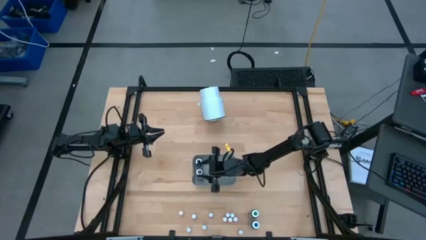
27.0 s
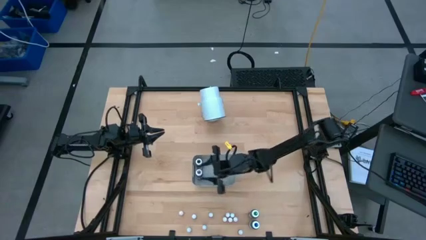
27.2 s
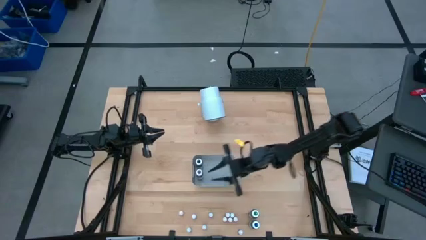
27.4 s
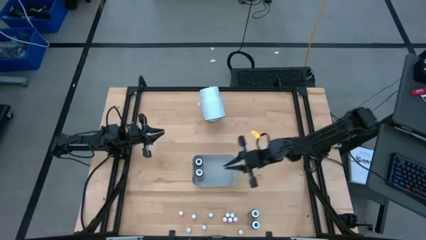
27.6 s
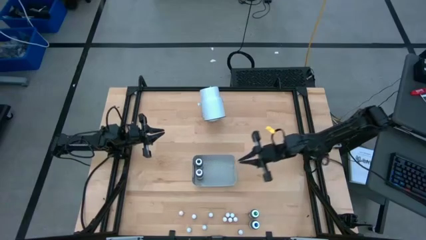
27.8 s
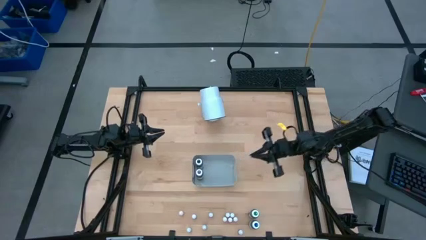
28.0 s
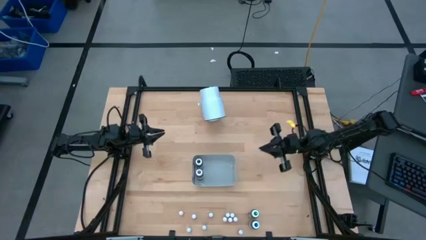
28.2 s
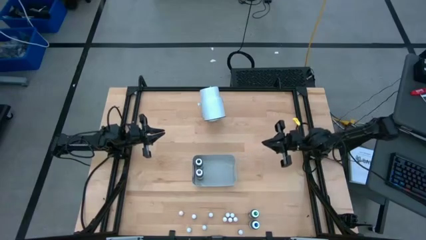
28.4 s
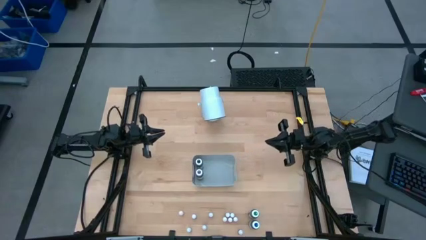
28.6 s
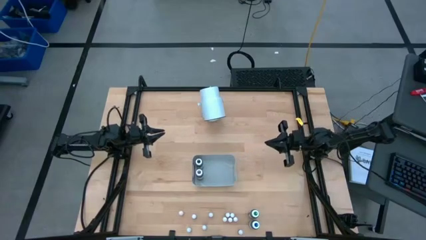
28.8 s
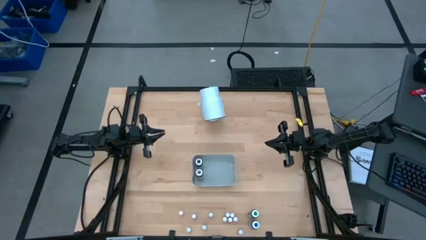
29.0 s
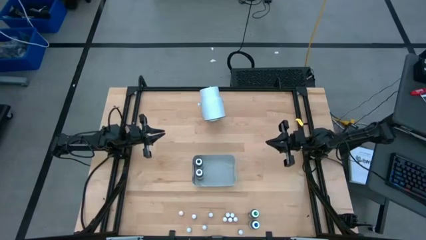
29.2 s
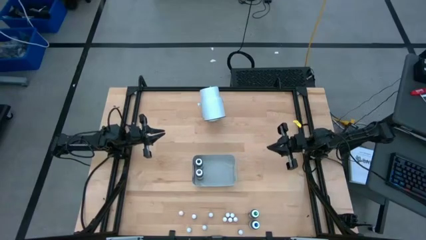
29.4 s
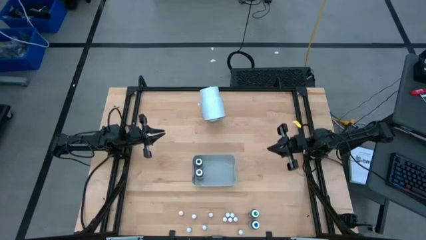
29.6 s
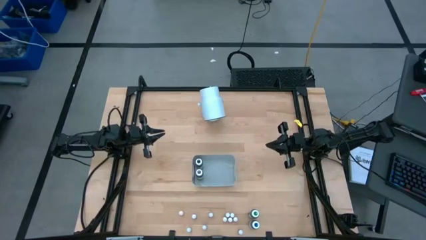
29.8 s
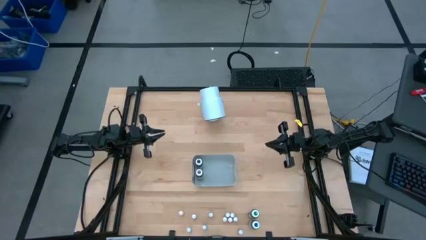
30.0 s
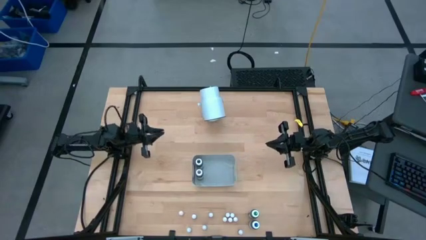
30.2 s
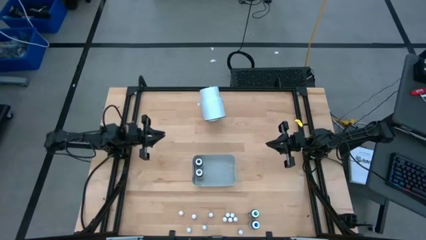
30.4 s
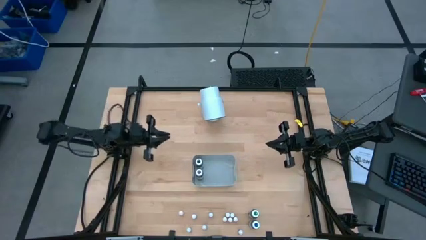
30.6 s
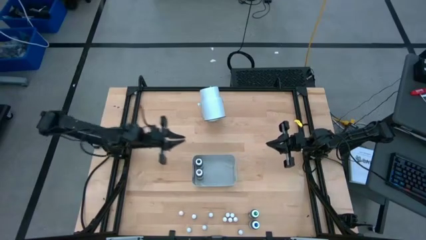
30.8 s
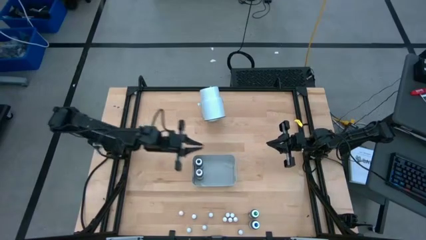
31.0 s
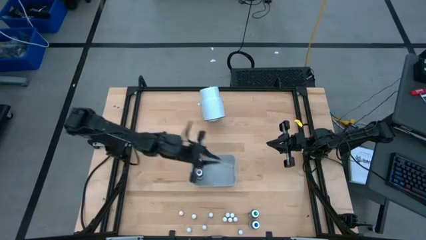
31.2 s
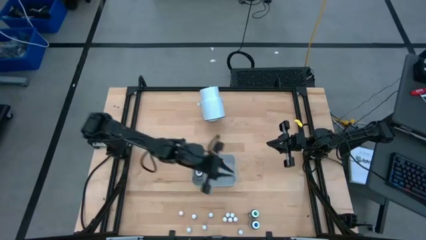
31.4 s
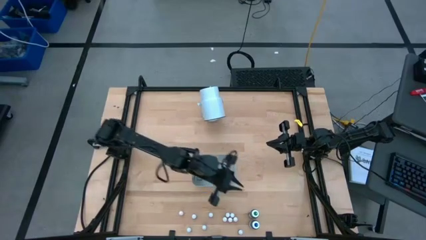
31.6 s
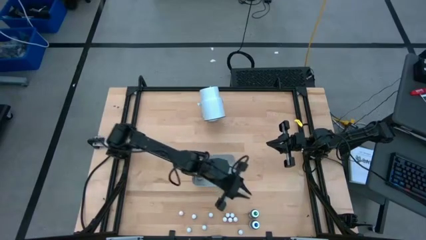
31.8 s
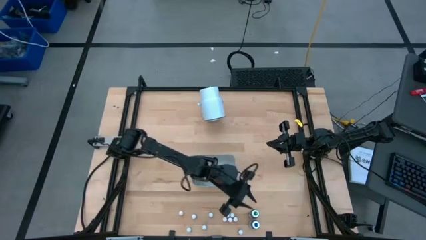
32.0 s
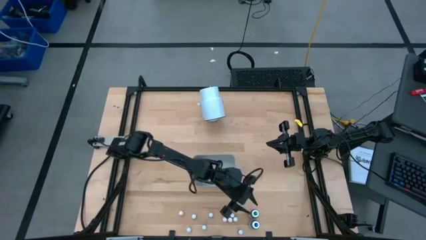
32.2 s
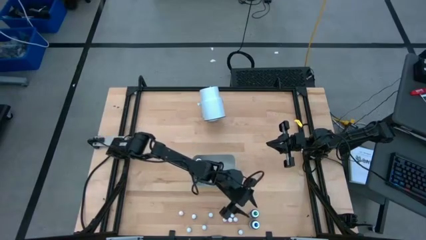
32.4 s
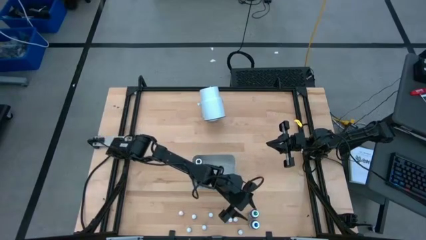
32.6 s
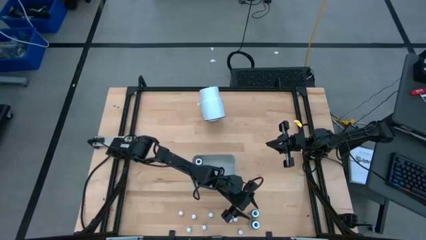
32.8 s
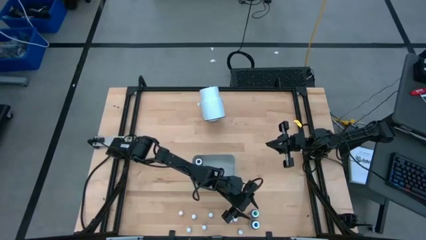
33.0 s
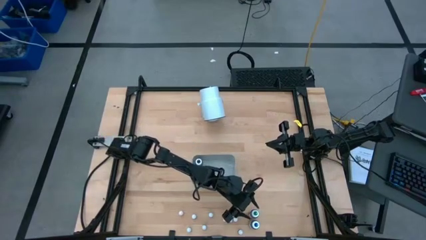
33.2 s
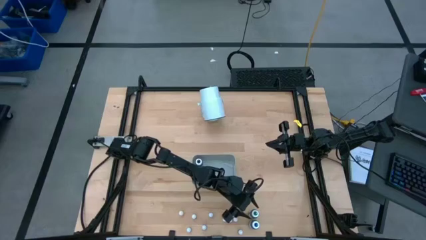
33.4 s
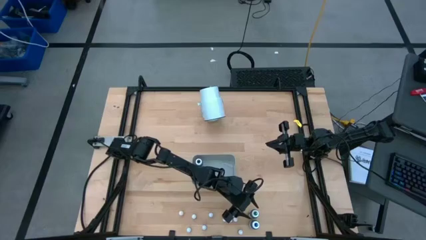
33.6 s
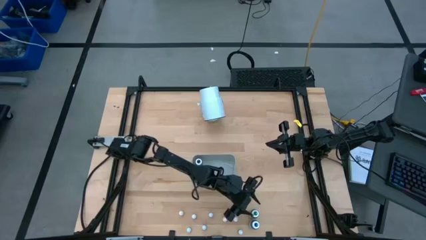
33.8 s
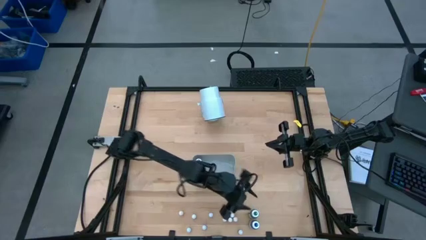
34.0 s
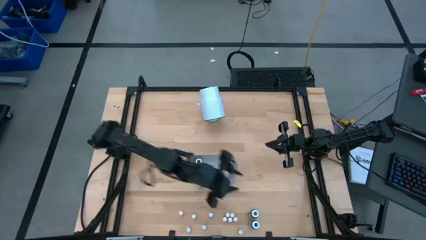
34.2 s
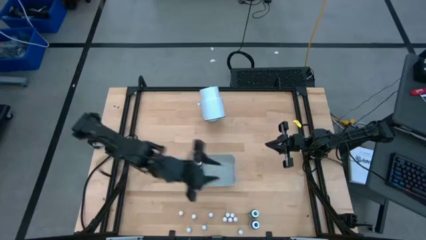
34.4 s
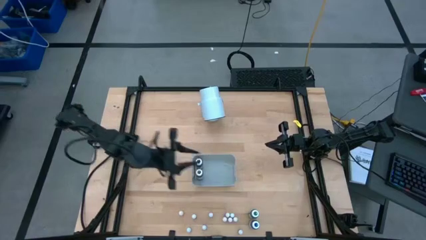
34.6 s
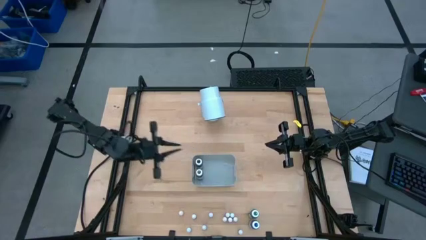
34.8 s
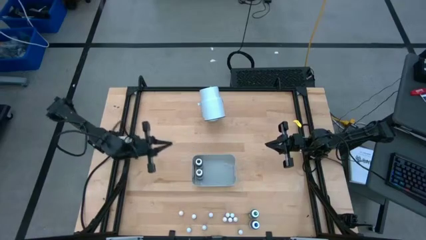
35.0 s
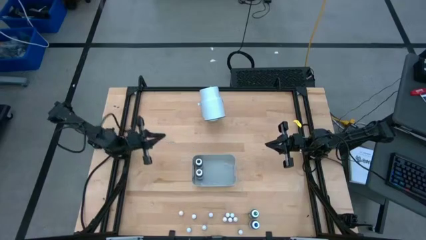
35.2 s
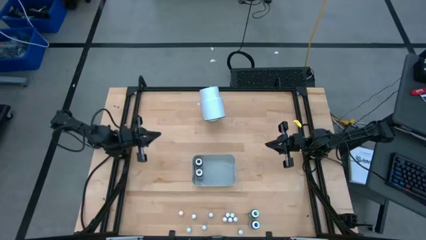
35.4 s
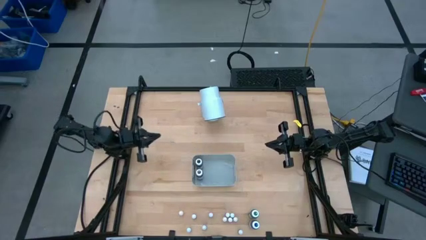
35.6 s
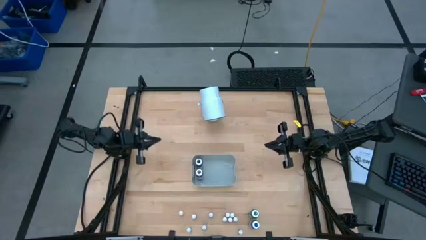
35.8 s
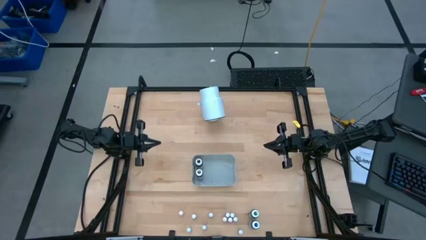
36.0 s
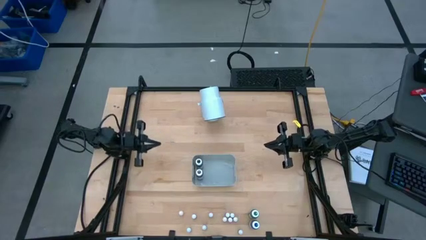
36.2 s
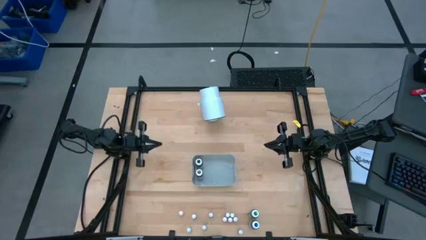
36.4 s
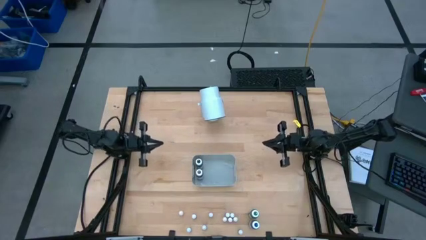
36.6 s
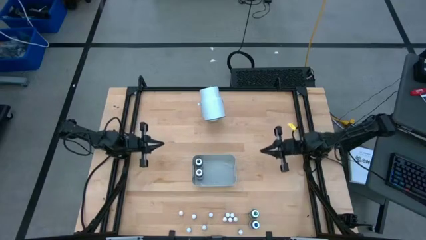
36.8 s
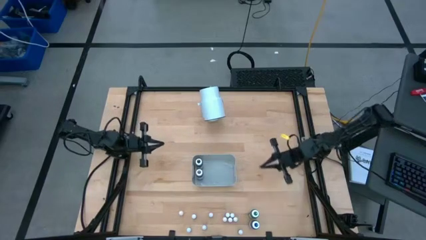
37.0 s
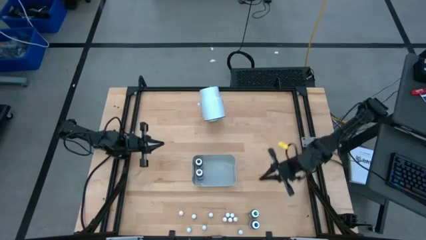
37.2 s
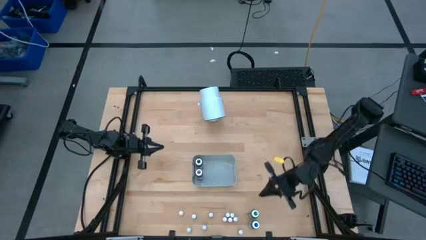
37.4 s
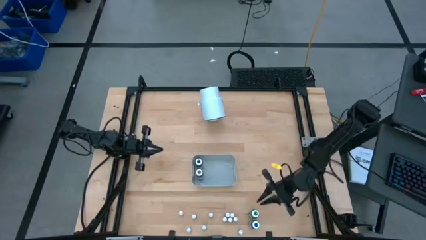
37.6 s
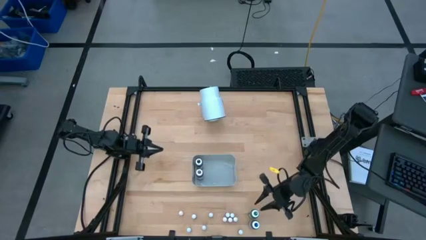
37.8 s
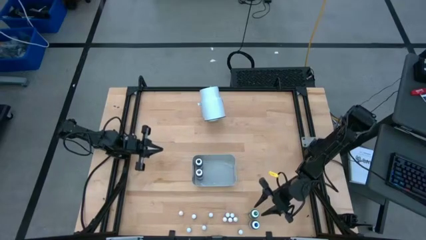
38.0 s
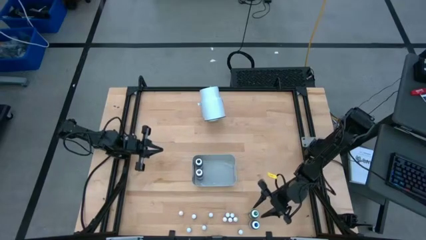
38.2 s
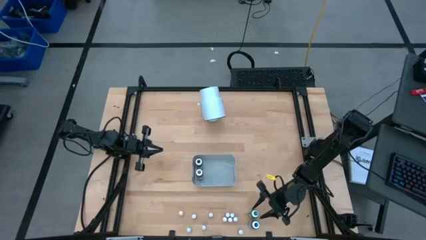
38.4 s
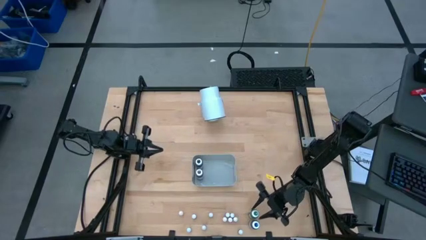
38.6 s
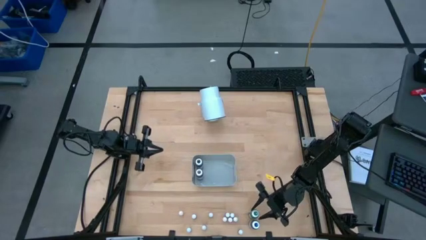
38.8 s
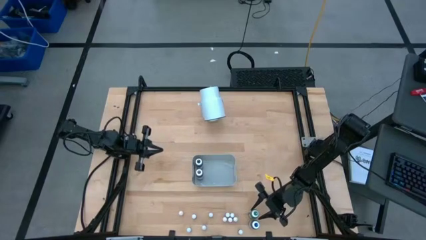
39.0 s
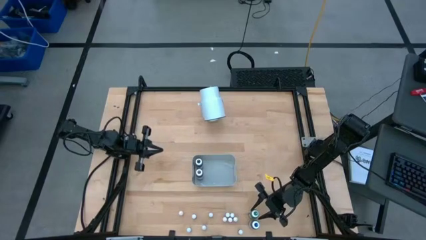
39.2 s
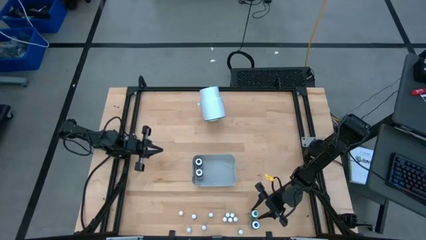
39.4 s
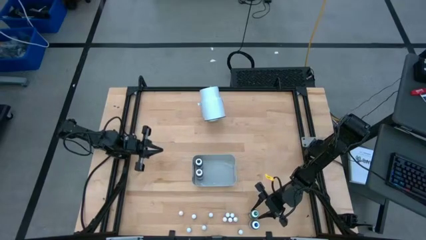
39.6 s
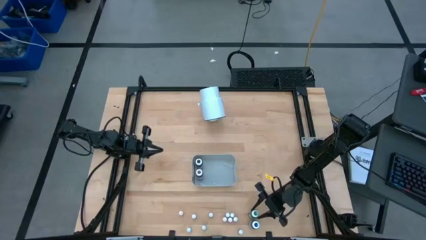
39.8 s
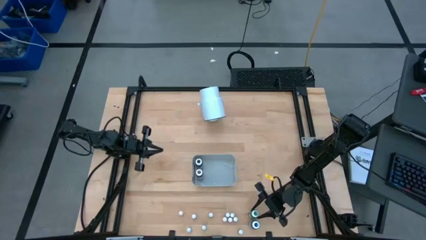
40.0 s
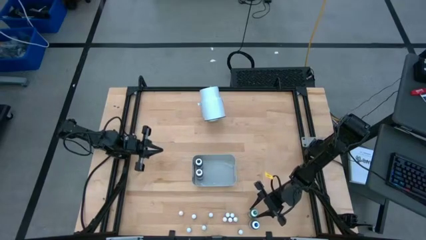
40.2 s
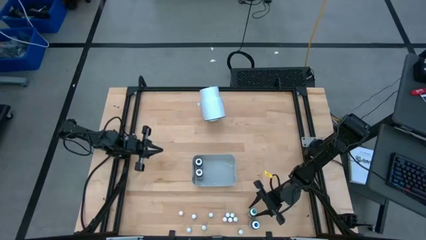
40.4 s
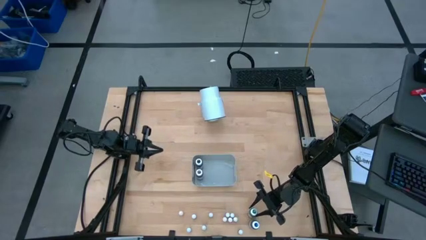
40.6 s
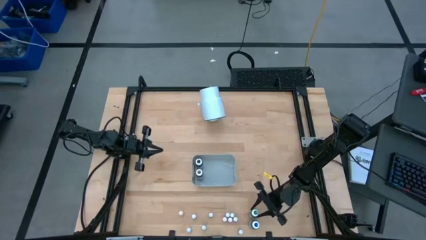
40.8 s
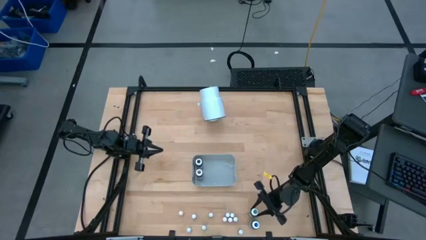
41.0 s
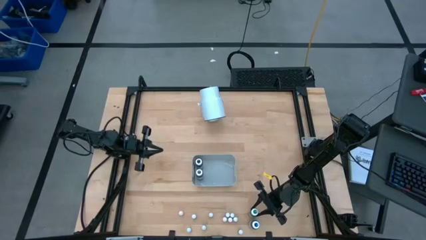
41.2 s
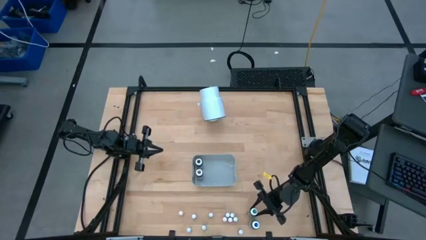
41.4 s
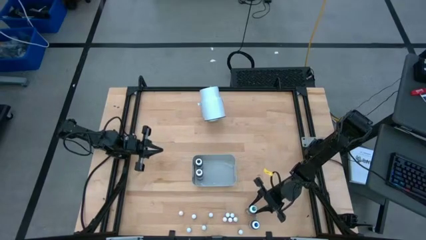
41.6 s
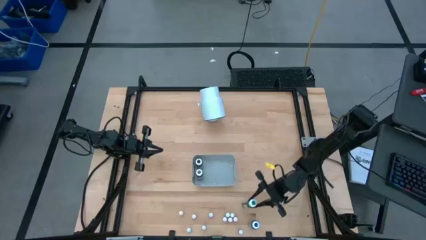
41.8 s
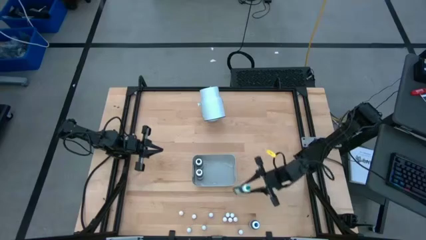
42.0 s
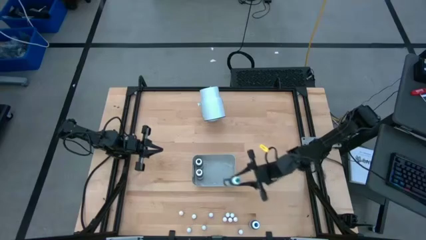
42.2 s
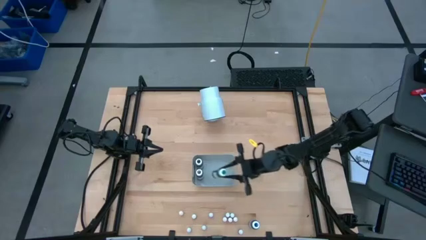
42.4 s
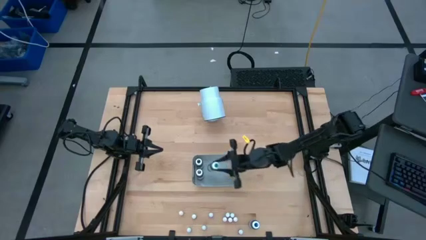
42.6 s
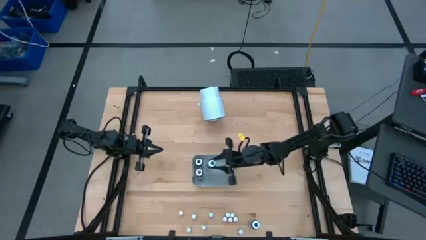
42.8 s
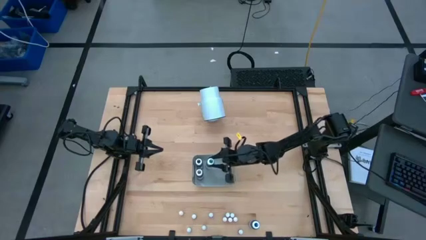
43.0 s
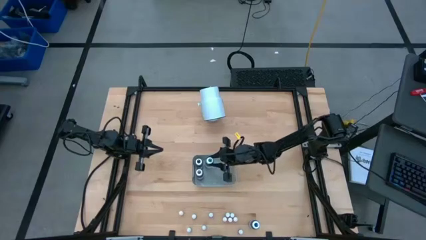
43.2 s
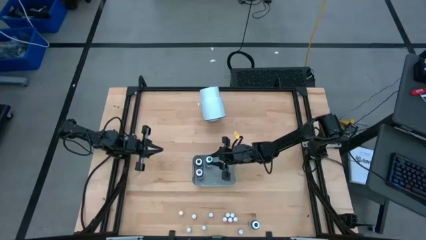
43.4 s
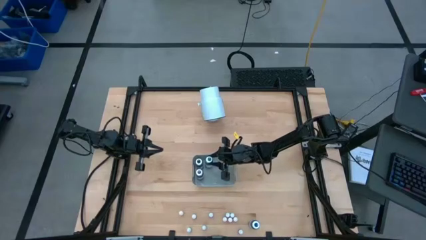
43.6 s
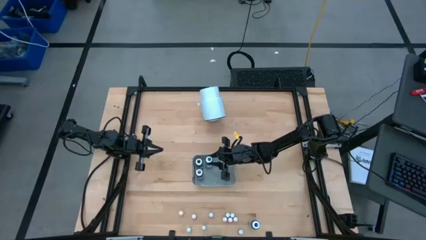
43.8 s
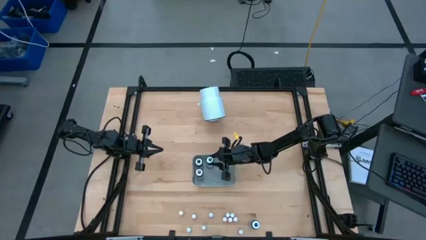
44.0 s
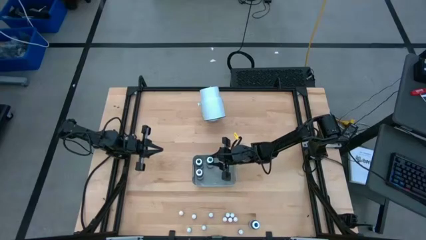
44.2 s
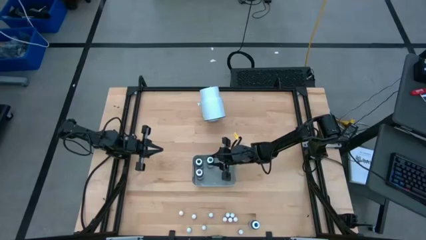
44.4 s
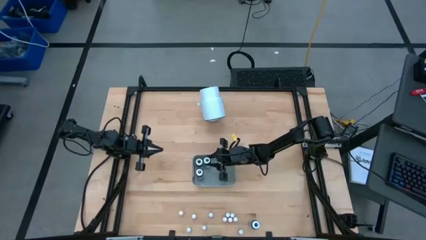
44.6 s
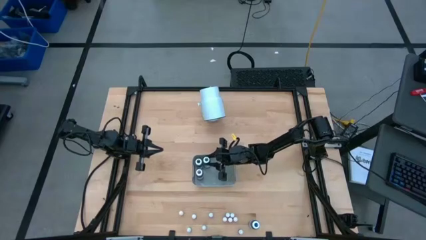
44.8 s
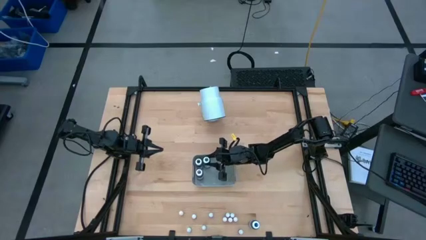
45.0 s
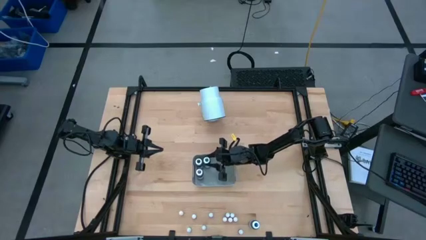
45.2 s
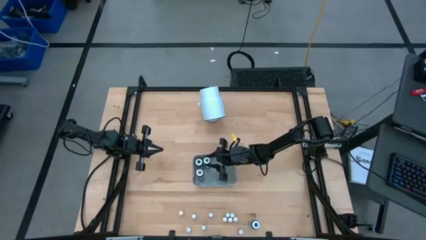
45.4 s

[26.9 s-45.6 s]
Task: Pick & Place food coloring
Put the big green food coloring bottle into the gray bin
